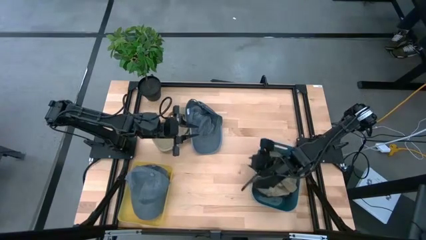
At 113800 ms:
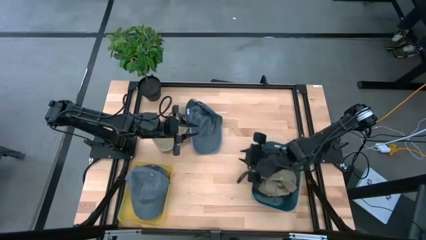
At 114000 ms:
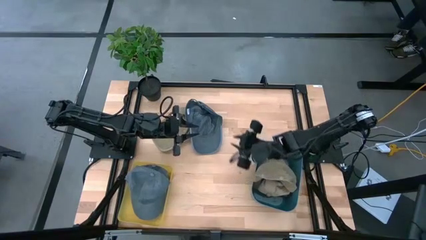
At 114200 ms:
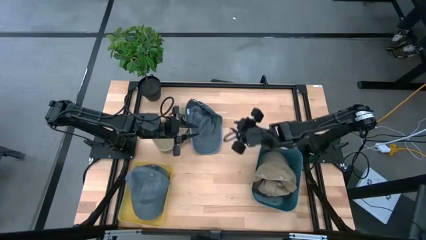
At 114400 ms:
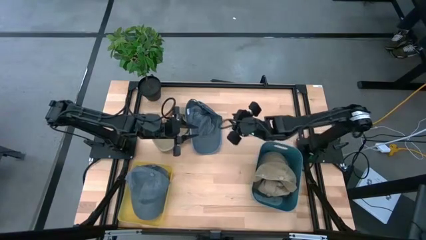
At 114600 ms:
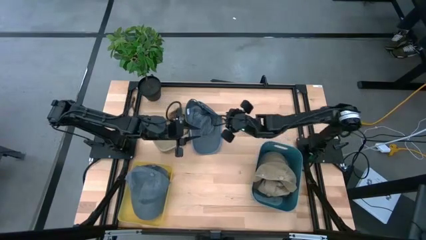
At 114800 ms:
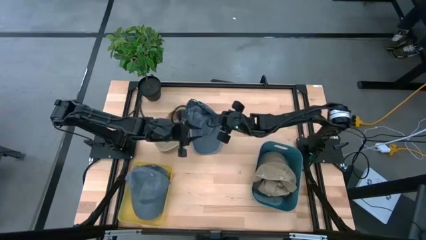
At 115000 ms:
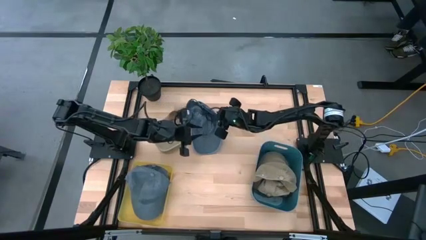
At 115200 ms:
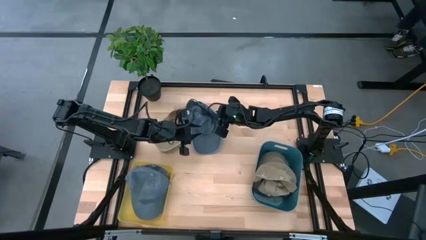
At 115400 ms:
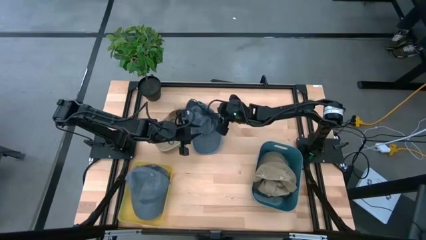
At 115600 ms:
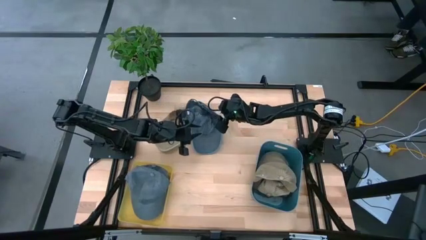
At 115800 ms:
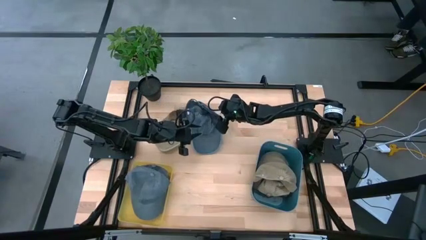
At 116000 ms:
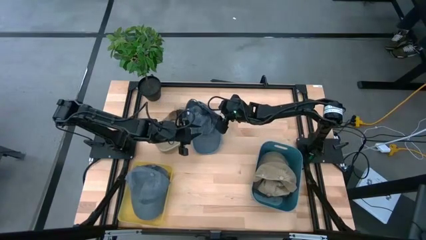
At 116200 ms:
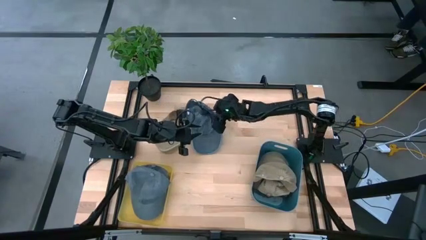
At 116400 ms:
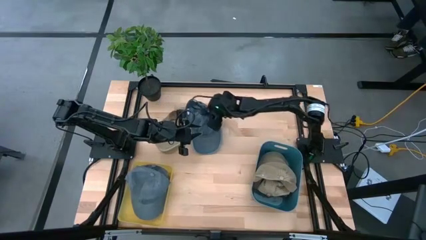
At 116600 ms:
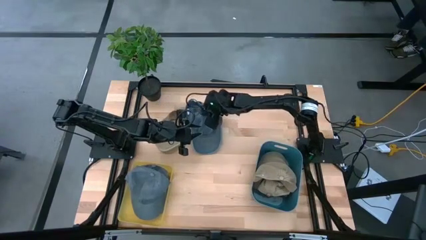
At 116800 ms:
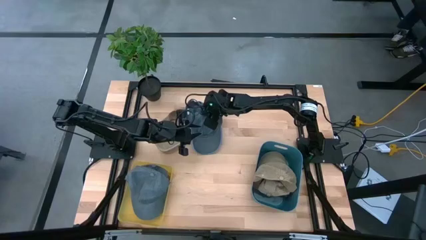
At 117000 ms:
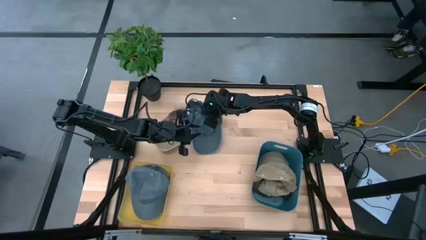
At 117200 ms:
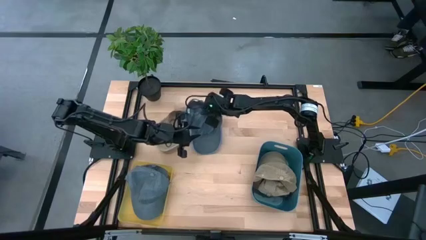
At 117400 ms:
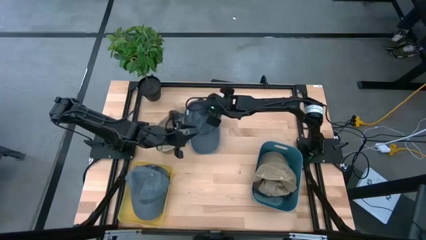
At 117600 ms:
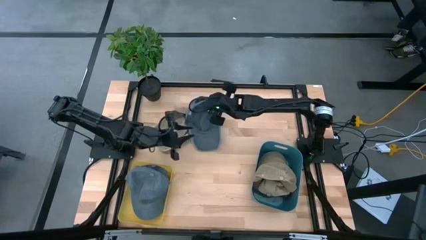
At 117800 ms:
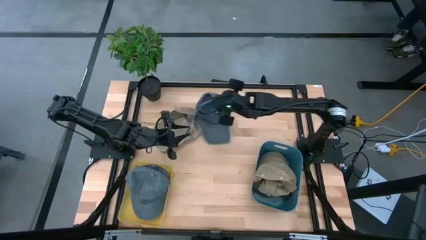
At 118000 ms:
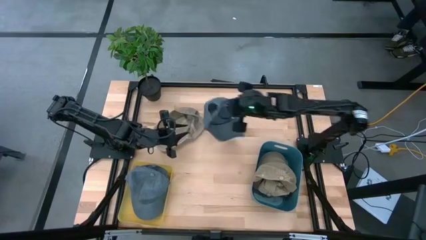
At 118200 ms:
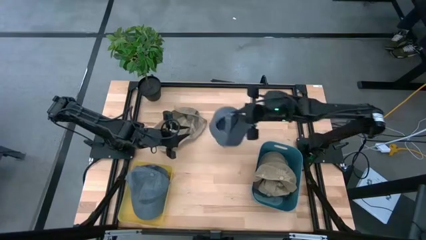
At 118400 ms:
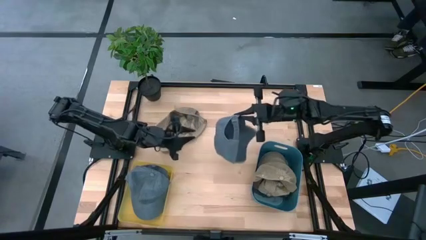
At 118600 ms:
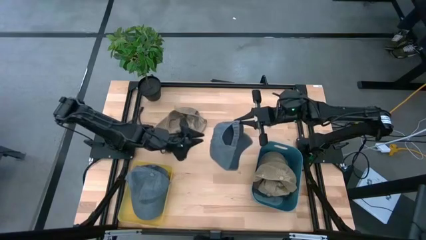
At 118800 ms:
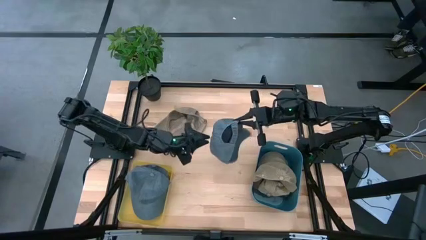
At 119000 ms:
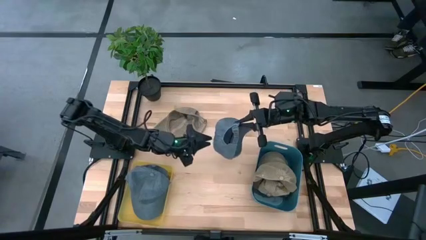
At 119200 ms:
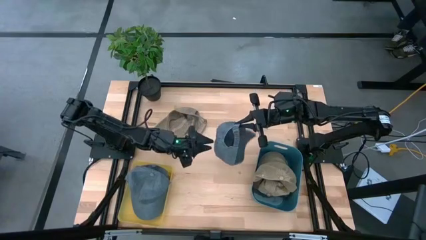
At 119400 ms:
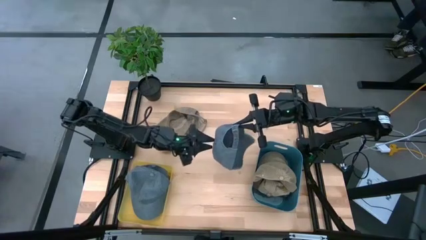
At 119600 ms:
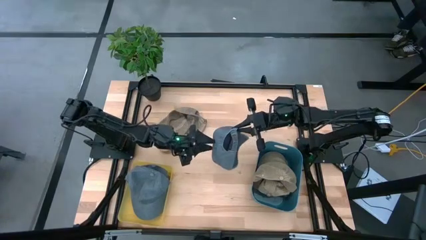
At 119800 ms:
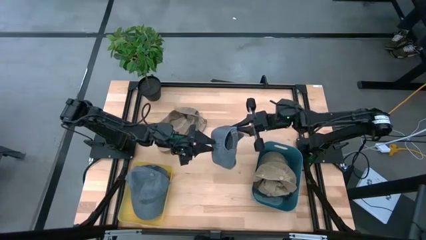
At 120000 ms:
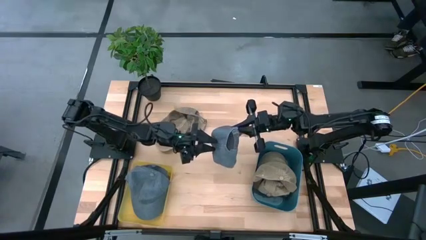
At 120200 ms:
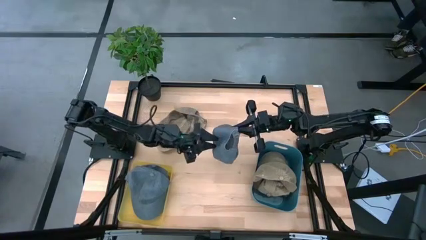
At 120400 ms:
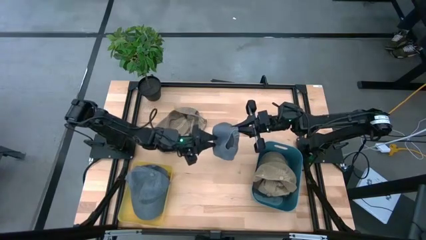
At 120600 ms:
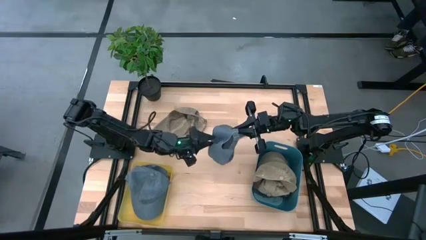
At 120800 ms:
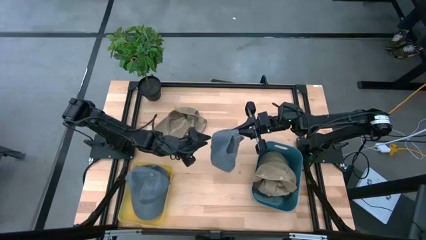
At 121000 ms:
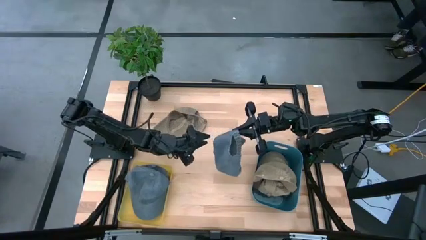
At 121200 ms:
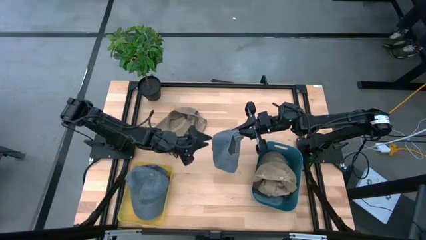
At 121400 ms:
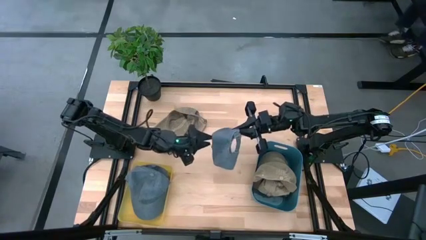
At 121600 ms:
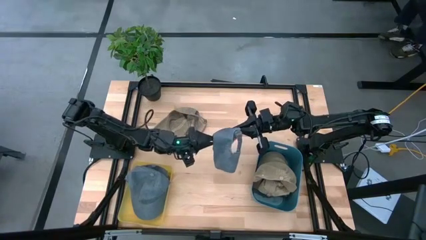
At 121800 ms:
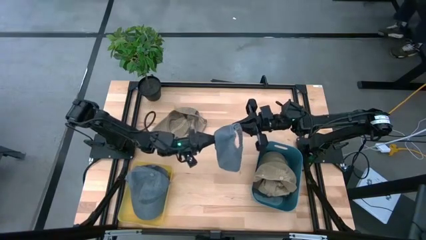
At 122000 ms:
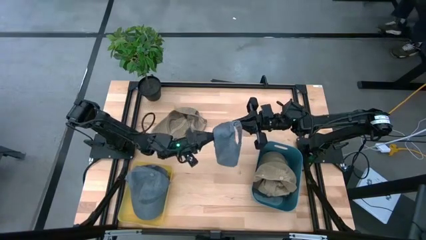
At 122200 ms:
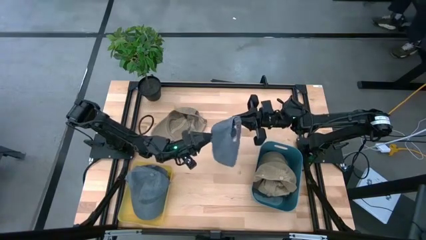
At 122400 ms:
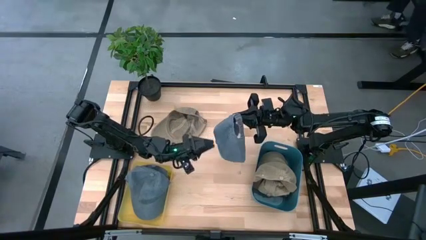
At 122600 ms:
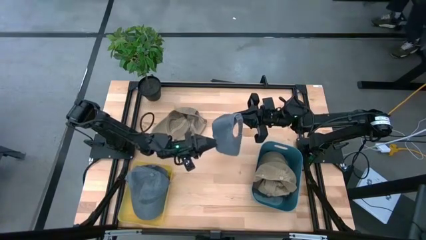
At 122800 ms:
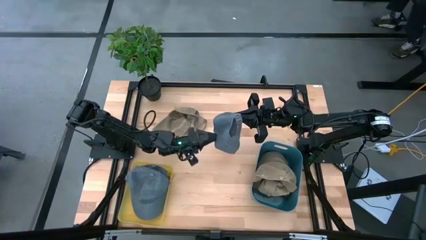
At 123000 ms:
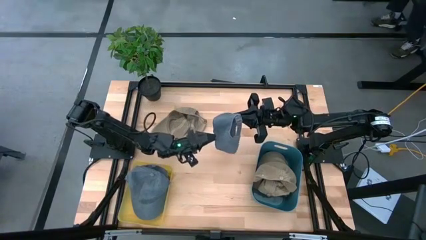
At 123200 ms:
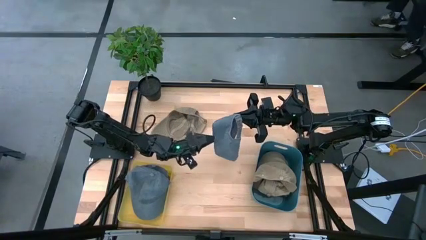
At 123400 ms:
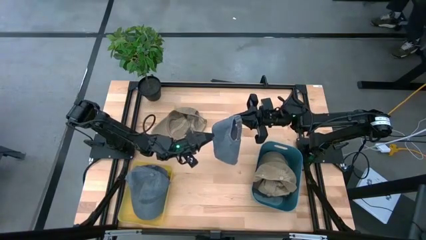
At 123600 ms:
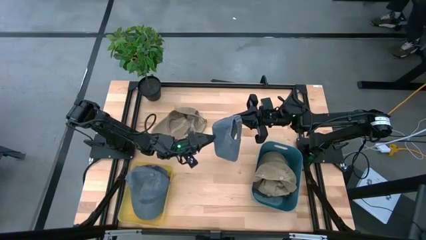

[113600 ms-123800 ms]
Task: Pick & Place hat
Put the blue cap into the yellow bin

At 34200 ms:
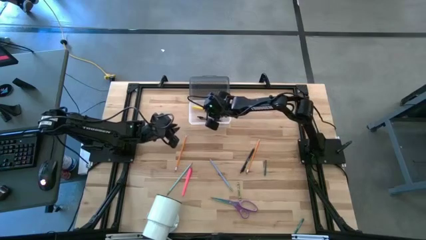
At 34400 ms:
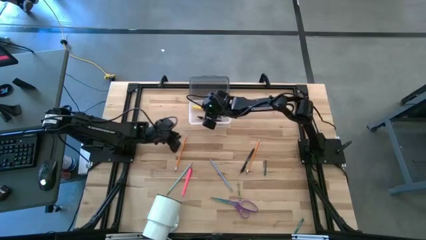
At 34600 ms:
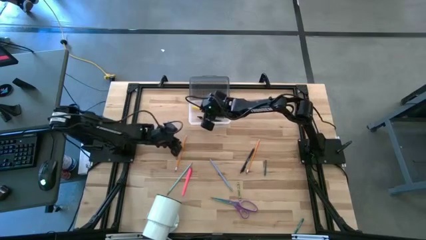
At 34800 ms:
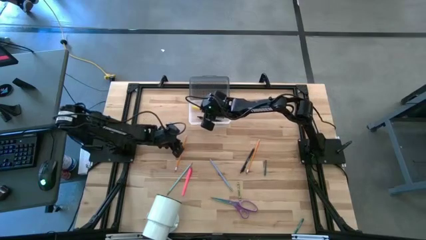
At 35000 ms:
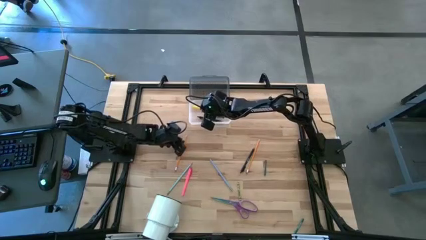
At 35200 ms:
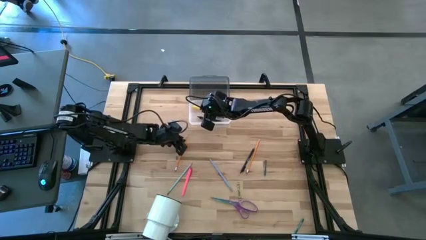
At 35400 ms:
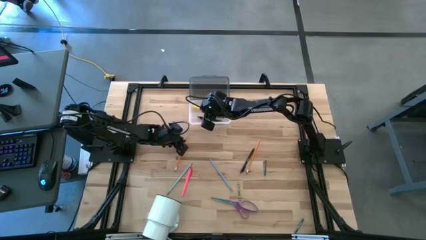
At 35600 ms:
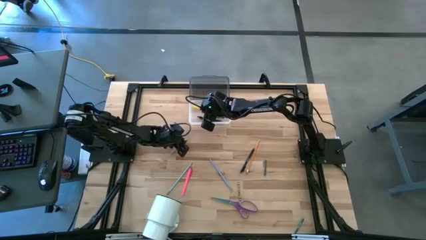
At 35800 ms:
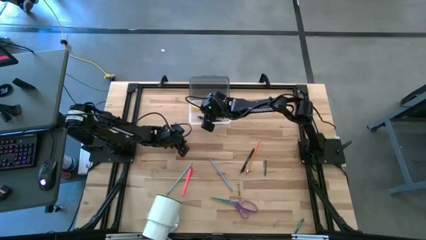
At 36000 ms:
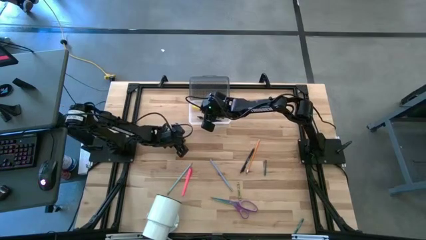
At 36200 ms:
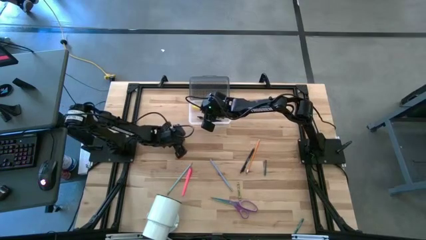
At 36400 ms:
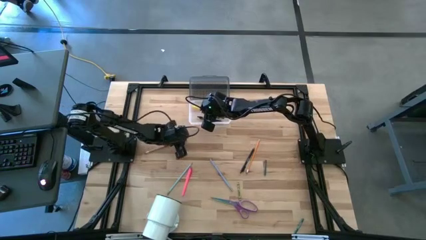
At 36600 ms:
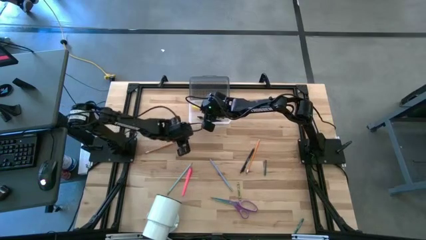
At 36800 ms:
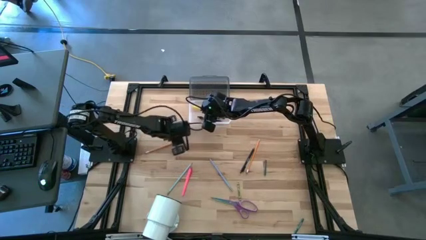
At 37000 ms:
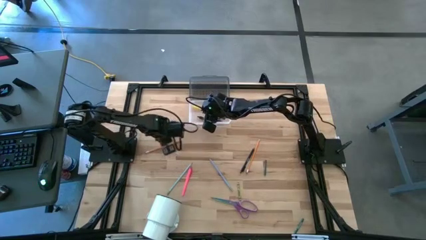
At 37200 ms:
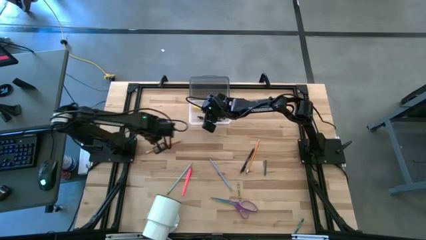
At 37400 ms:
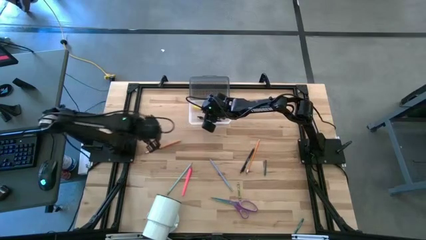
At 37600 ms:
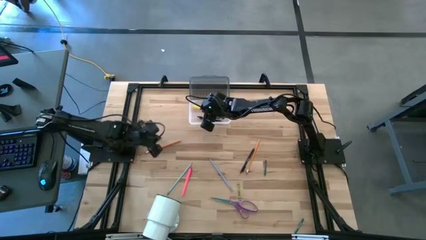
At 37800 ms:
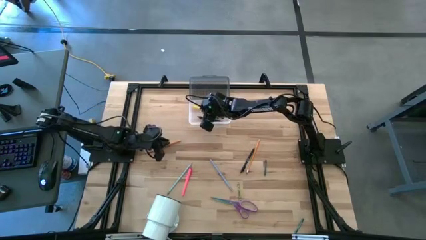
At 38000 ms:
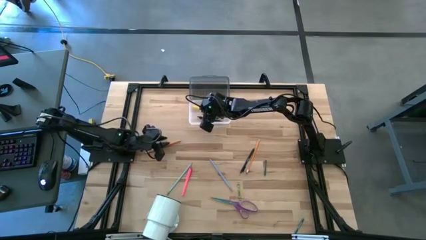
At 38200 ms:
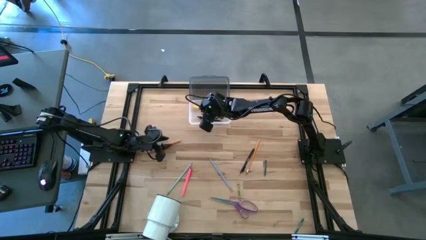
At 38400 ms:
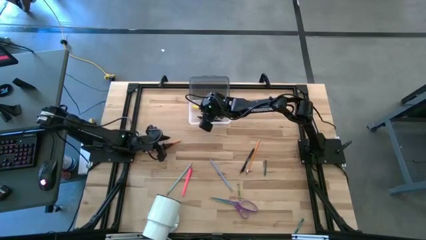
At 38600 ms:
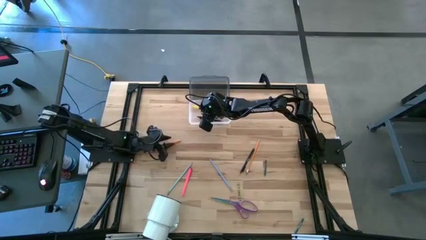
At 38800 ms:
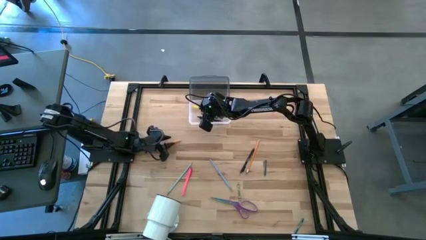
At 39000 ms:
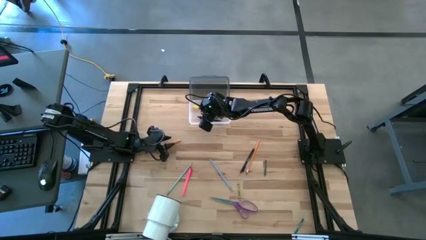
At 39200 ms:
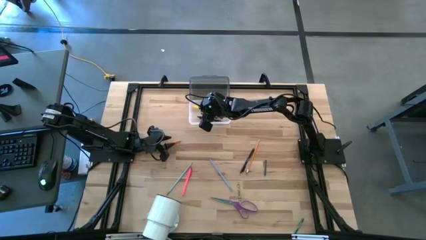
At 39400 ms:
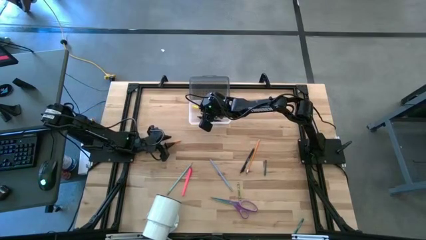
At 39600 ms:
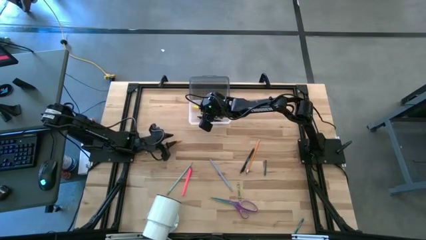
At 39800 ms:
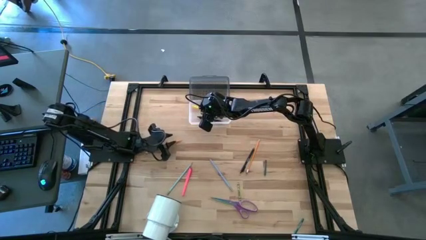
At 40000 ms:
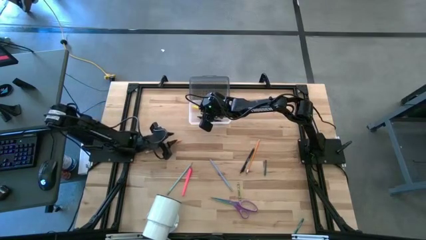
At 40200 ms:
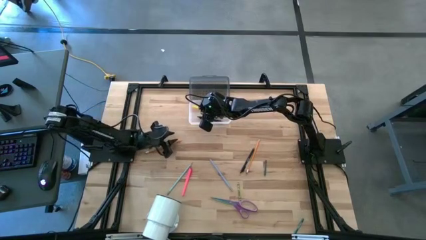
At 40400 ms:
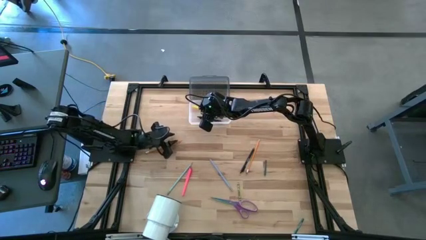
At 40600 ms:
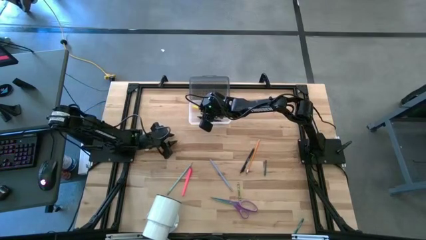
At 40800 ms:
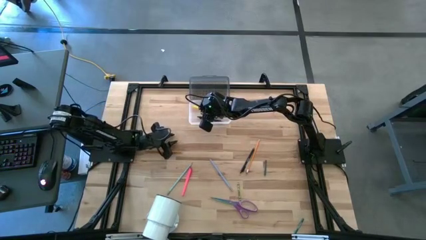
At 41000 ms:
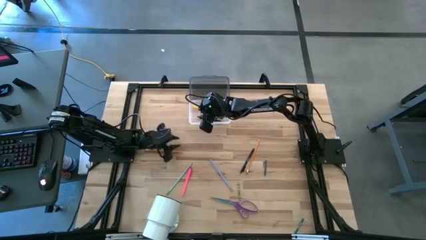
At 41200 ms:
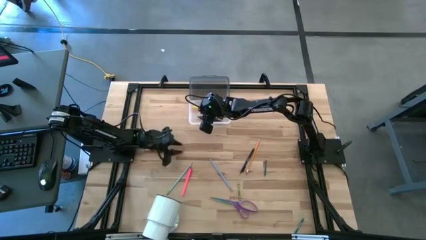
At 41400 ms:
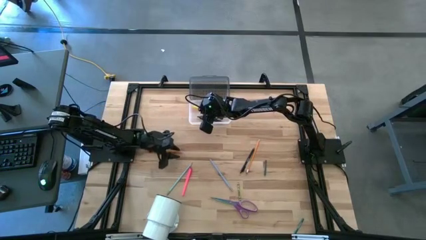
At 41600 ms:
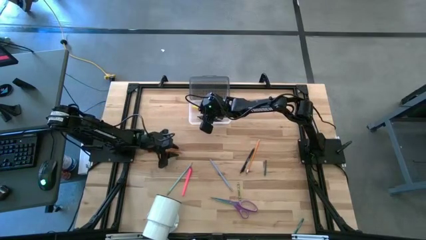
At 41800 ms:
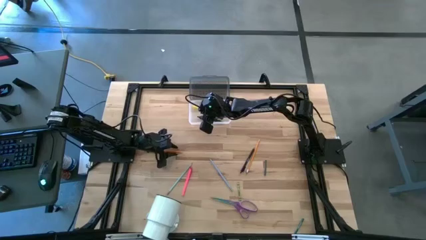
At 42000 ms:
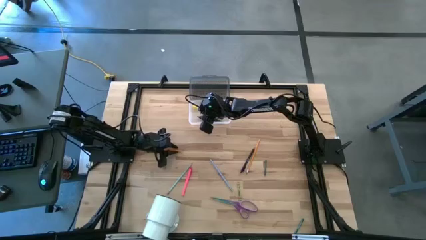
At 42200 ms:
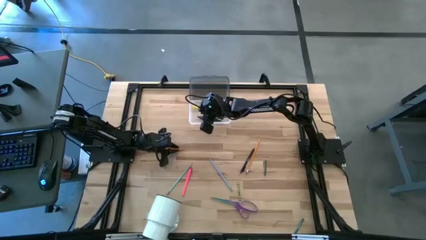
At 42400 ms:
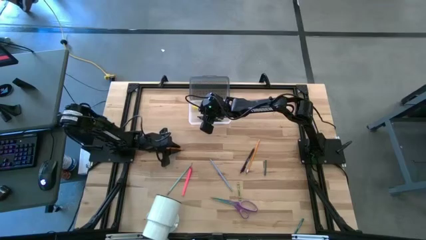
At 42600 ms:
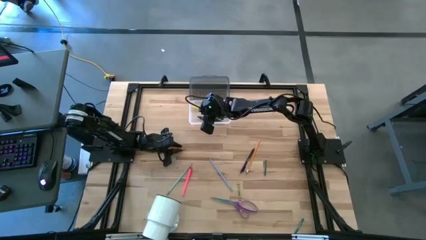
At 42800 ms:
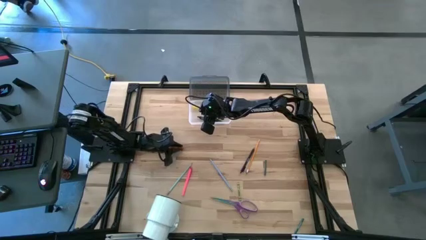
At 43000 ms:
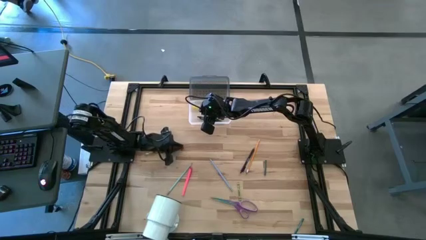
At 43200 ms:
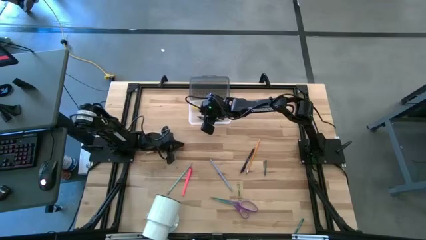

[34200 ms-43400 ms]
Task: Pick & place school supplies into a supply box
Put the left orange pencil into the supply box
